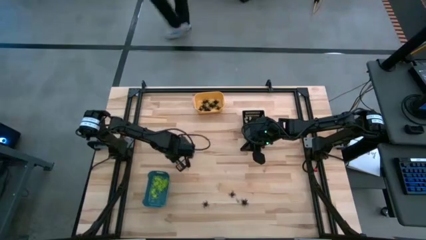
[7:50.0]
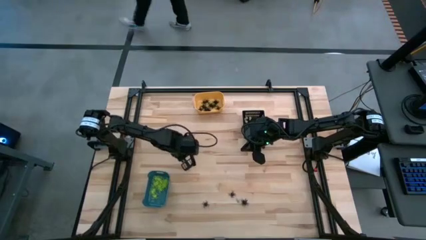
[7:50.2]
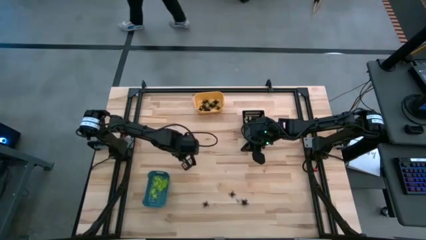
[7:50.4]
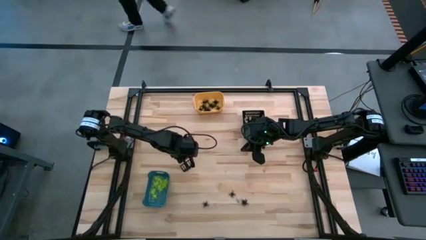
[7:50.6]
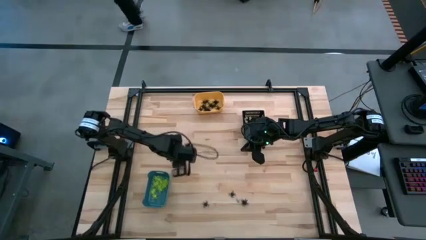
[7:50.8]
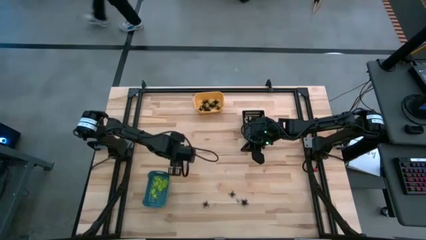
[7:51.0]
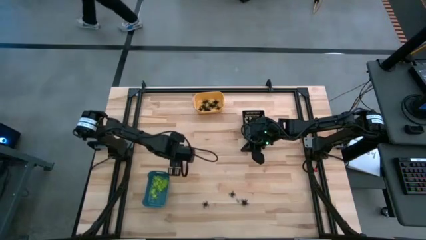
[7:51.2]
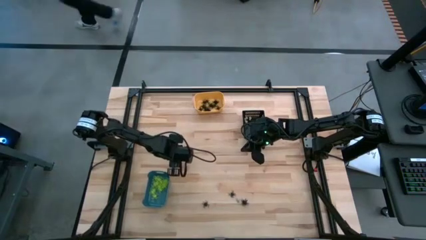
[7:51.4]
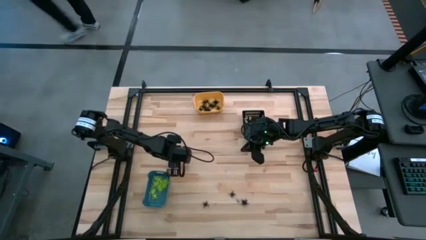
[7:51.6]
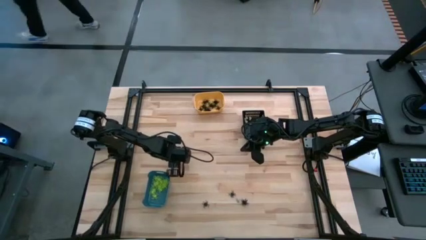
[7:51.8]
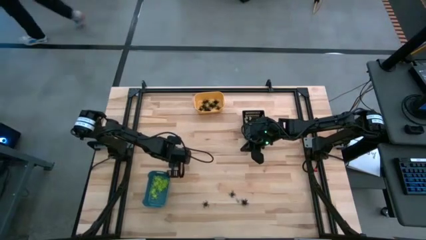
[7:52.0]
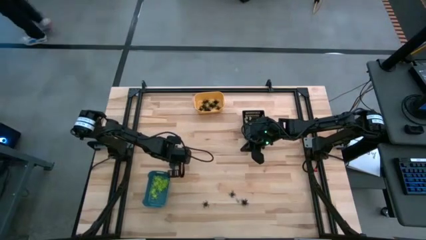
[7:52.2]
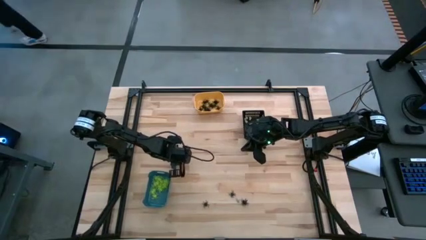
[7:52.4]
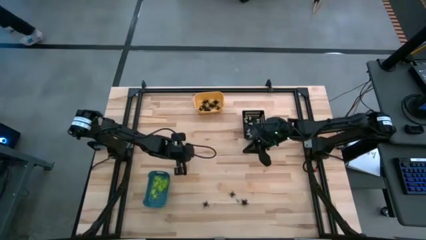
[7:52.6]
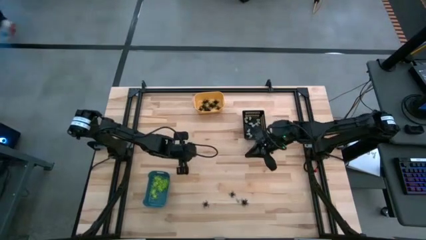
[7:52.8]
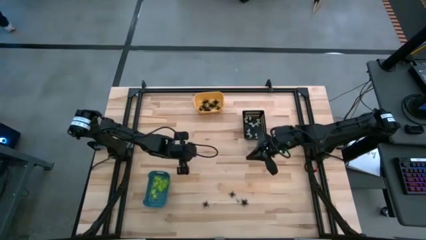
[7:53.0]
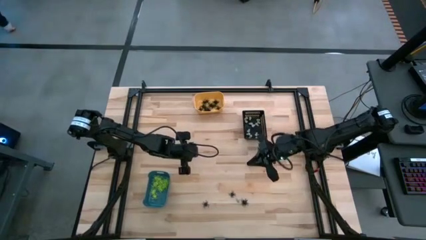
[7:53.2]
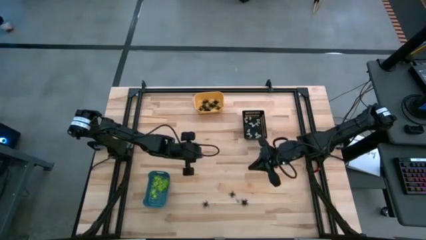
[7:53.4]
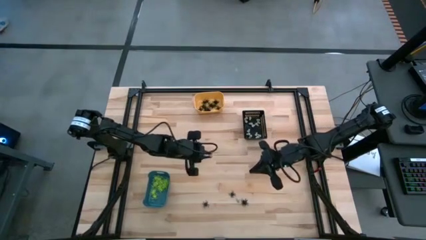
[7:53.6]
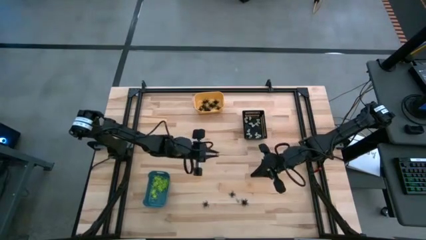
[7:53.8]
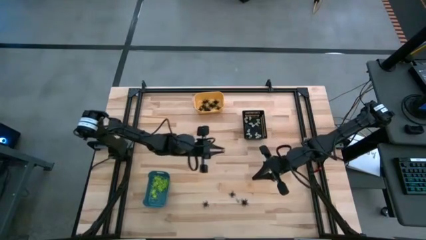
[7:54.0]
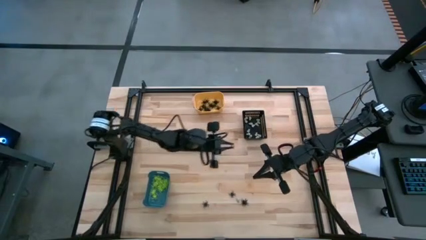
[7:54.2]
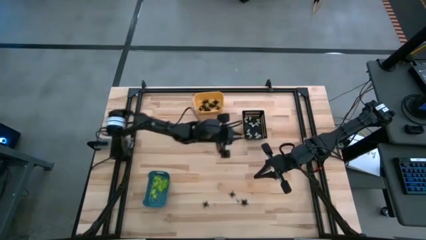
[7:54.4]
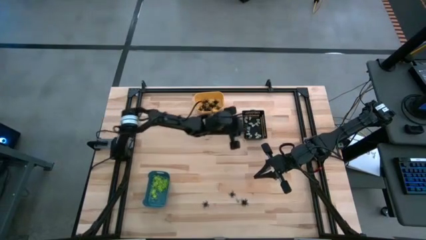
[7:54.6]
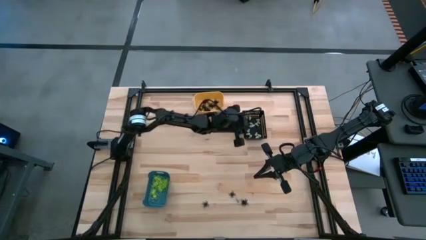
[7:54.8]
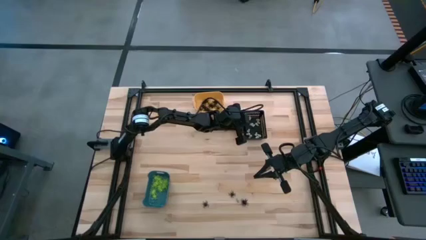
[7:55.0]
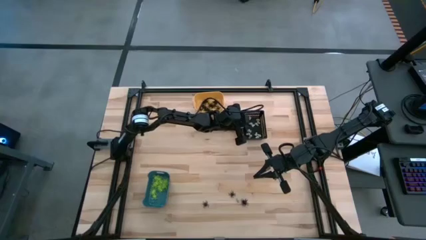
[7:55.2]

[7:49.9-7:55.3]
Task: Sort Halloween decoration
Put the white skull toy into the black bin

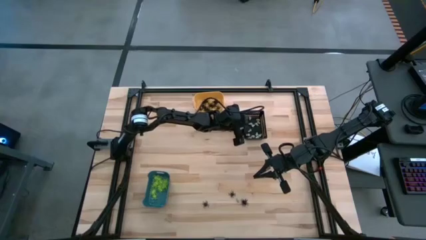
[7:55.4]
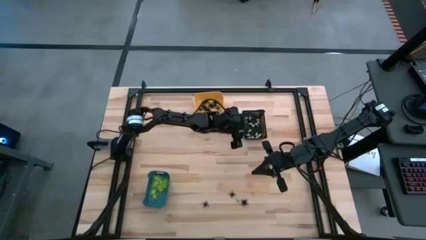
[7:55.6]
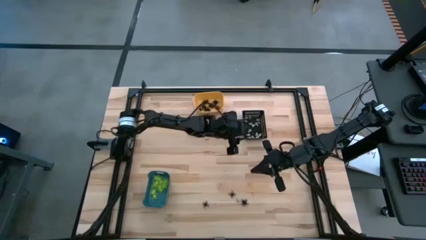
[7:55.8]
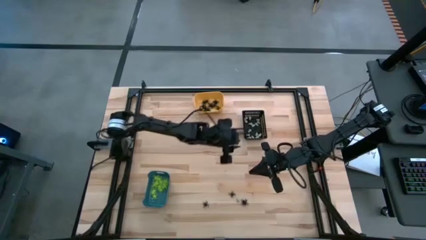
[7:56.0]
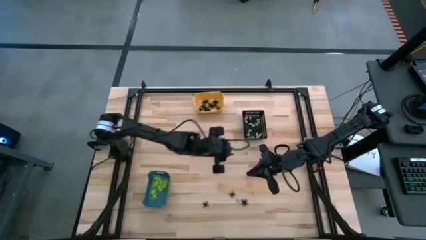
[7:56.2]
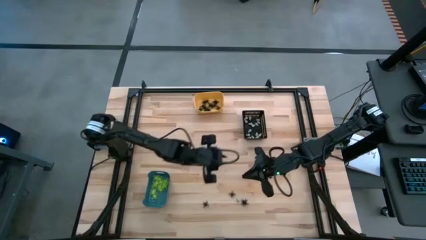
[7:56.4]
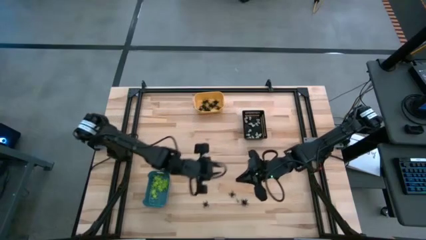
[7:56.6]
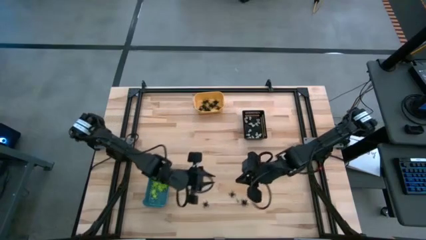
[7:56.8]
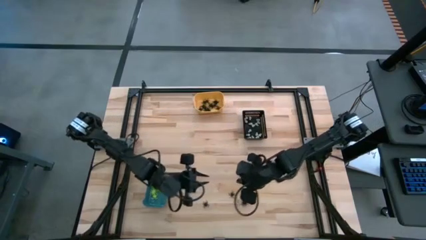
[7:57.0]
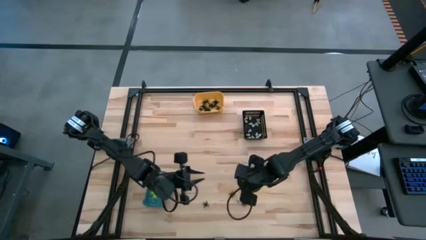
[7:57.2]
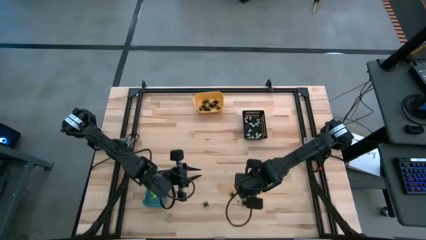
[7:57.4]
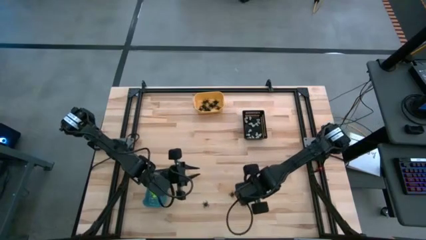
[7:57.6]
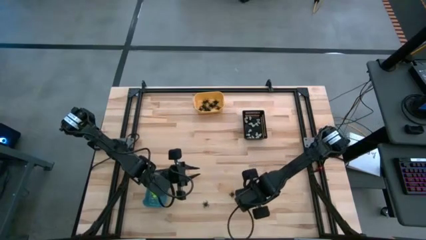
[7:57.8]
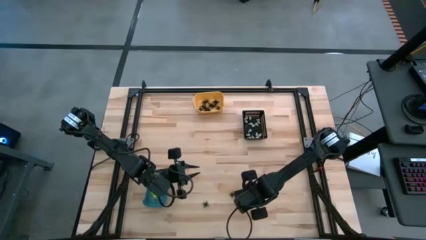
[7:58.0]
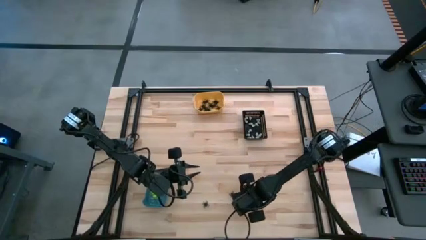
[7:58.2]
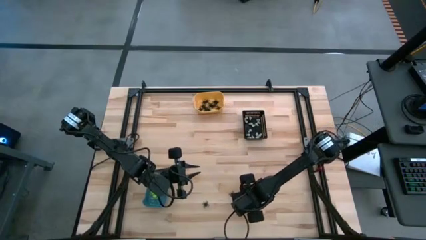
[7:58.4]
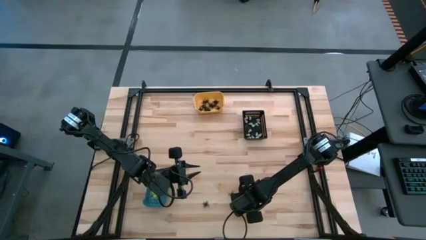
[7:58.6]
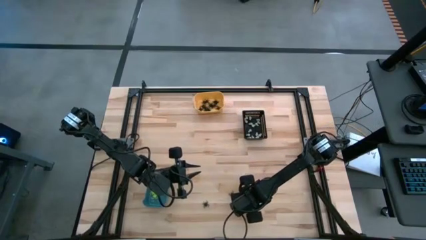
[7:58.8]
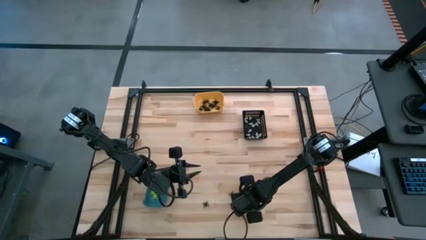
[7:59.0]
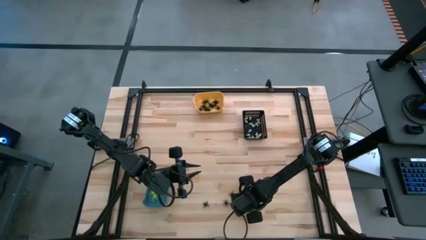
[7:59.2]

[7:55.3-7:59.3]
Put the black spider toy into the yellow bin

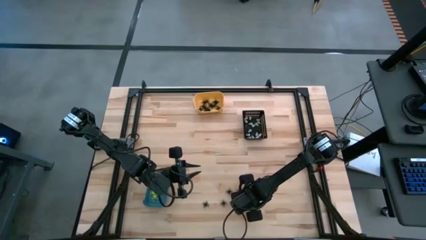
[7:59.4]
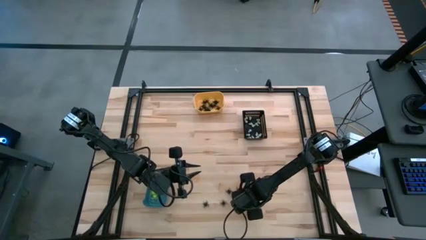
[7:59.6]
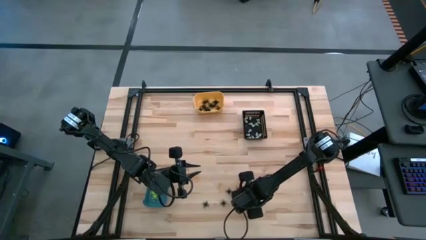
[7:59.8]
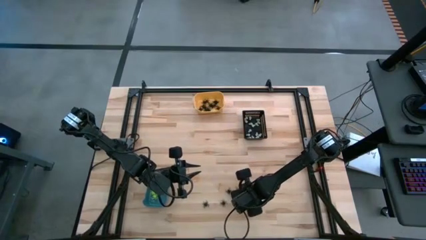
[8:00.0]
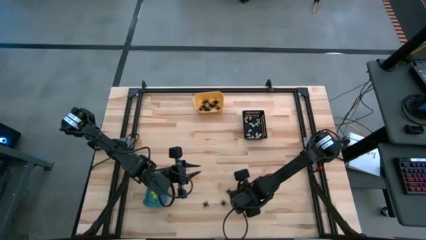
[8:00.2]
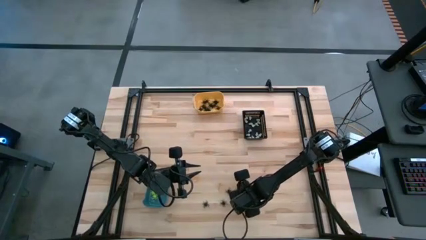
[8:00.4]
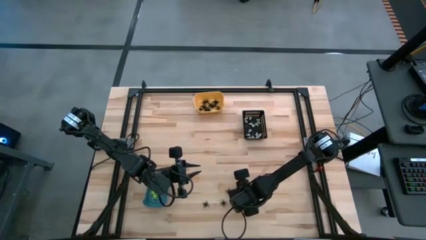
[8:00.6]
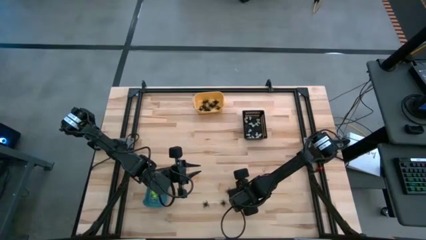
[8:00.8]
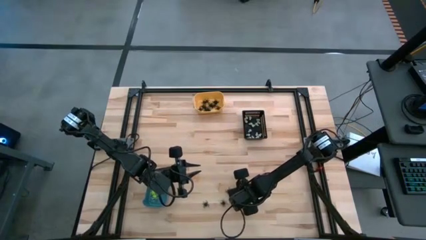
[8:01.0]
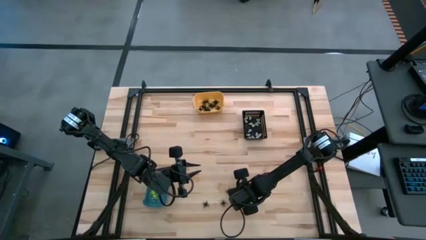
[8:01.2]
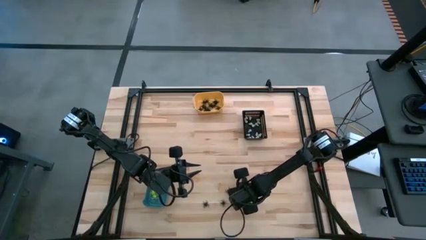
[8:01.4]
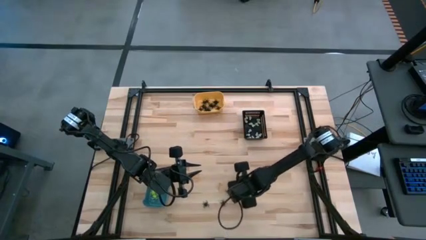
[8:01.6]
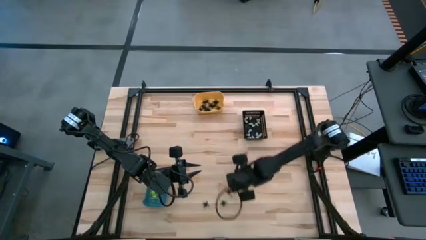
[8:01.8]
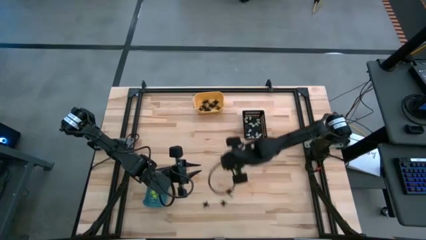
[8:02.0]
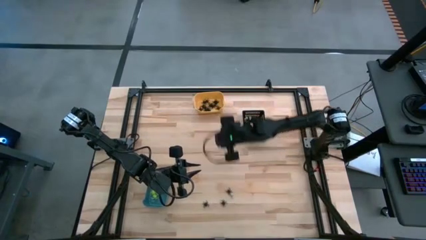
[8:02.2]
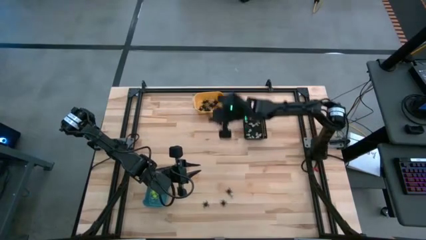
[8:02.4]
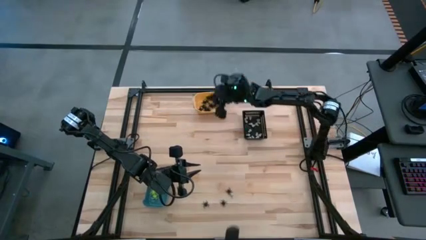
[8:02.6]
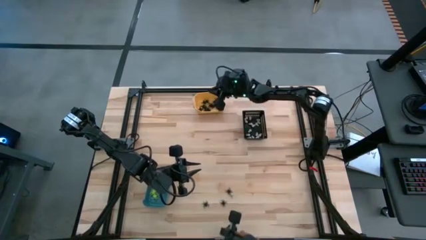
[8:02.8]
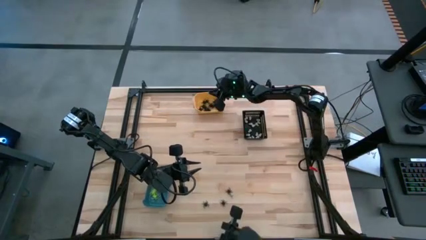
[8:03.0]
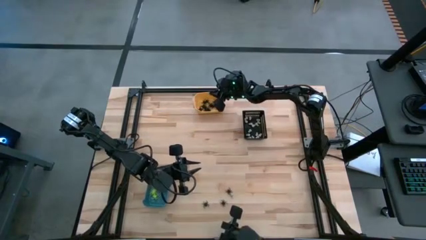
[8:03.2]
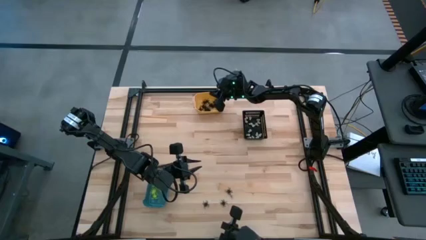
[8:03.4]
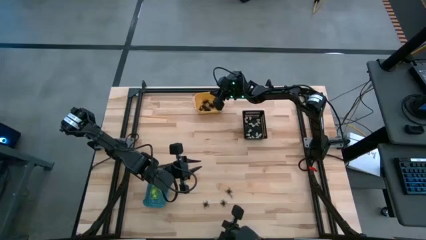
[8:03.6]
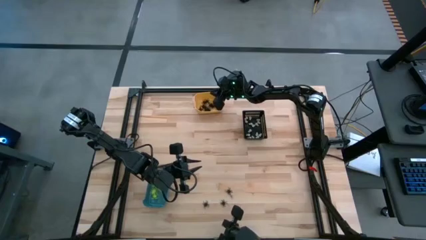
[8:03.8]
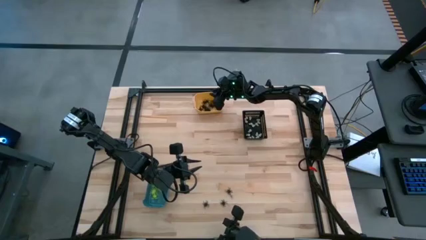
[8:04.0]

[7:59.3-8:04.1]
Put the black spider toy into the yellow bin

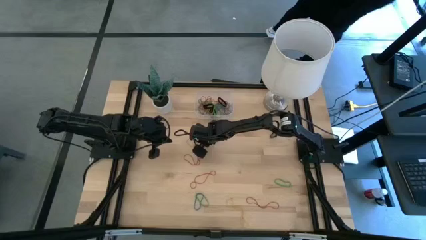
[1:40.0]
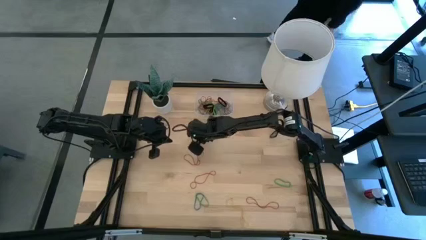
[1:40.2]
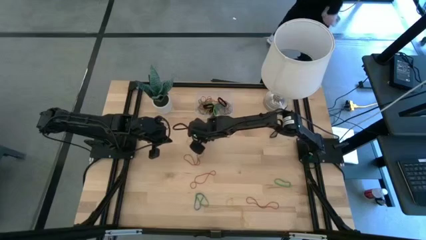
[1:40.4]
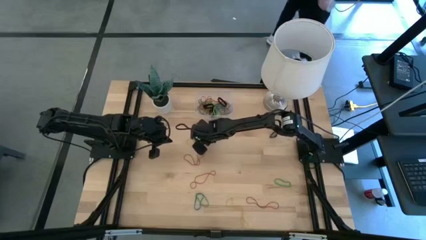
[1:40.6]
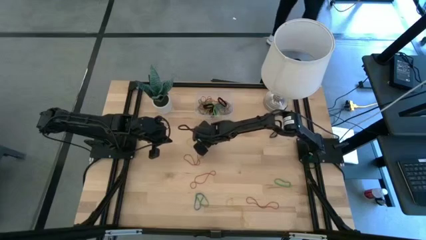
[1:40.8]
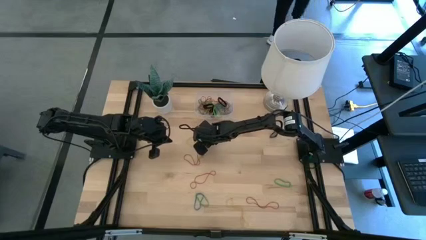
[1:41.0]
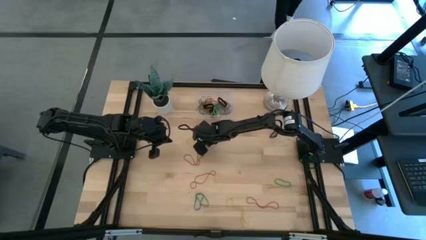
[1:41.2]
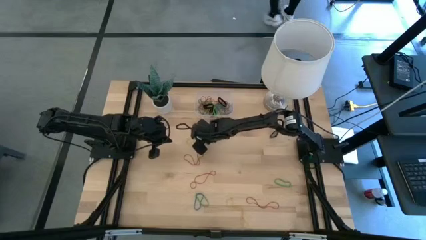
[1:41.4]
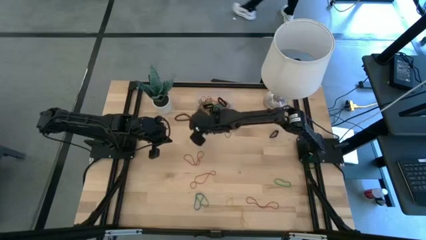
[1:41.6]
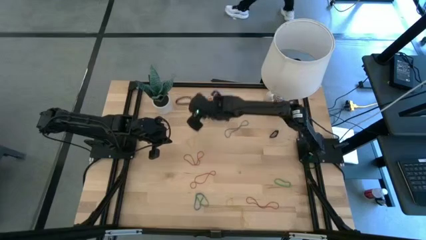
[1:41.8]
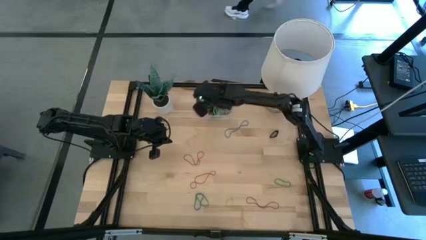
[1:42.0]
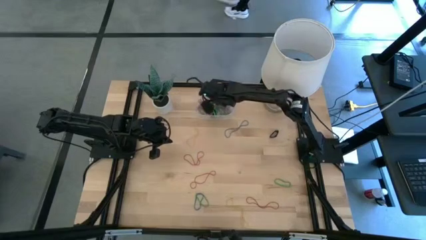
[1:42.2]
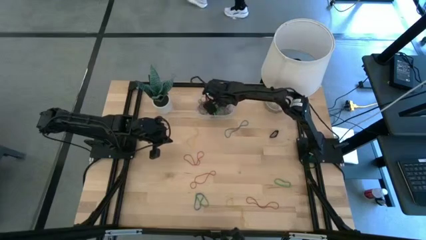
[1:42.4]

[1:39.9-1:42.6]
Task: Pick and place rubber bands into bin
Put the green rubber band into the transparent bin
